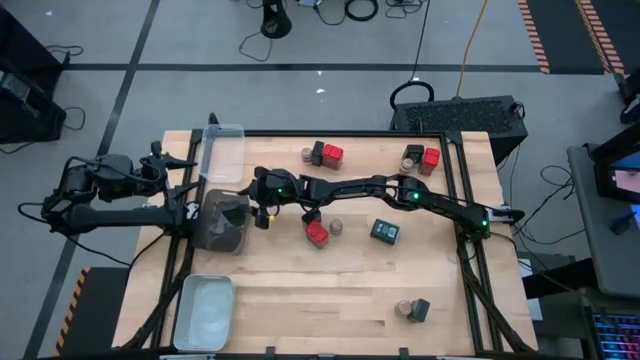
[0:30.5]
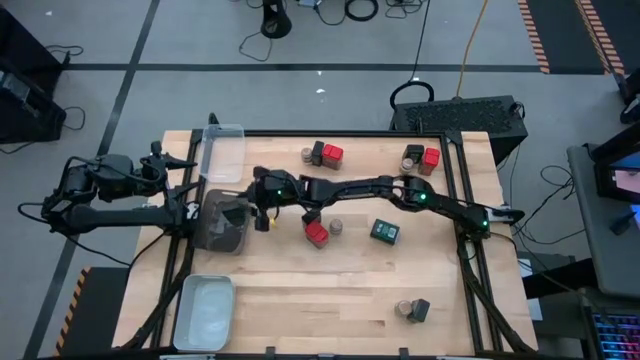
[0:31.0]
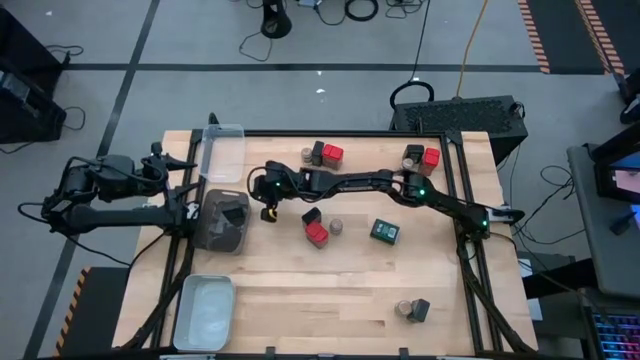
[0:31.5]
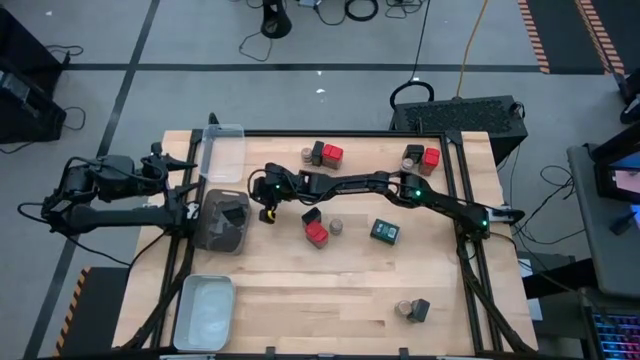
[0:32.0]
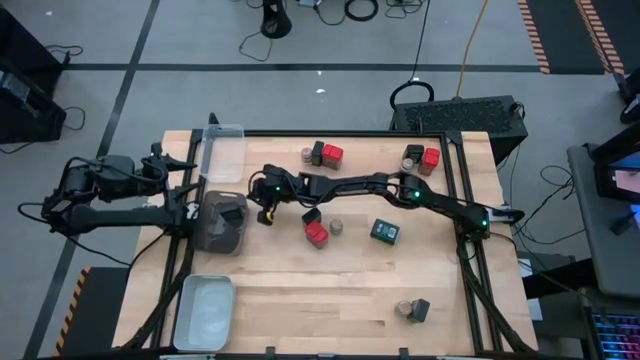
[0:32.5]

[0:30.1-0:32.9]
Task: Sort spices by type
Adjust the black bin

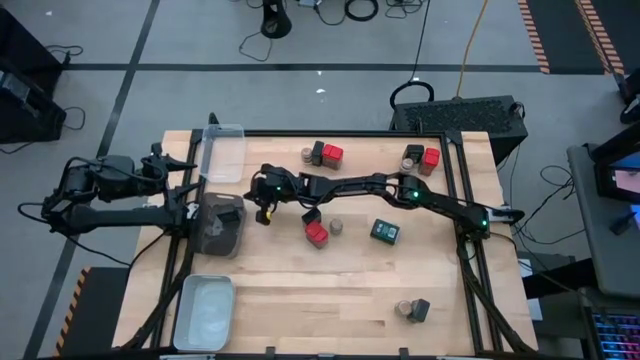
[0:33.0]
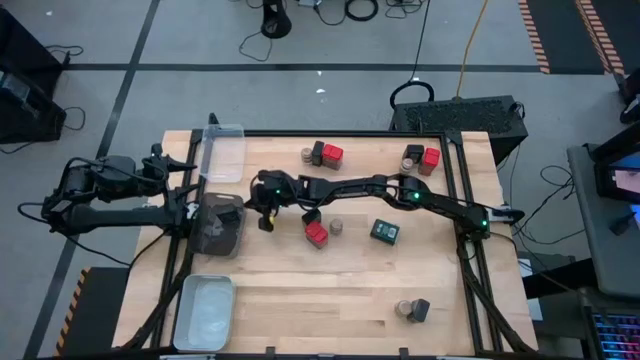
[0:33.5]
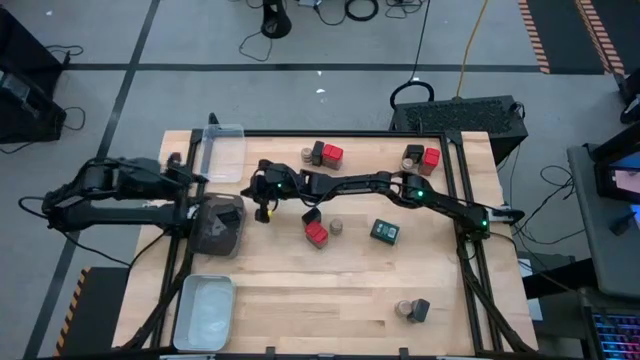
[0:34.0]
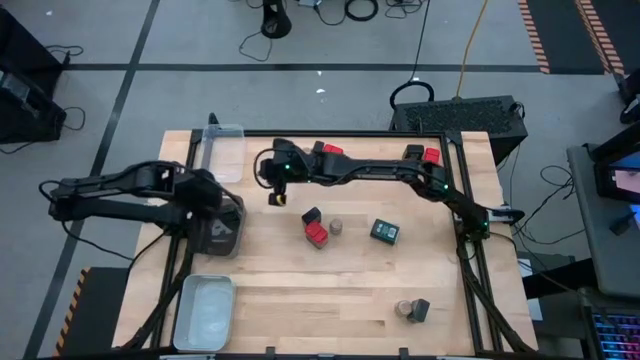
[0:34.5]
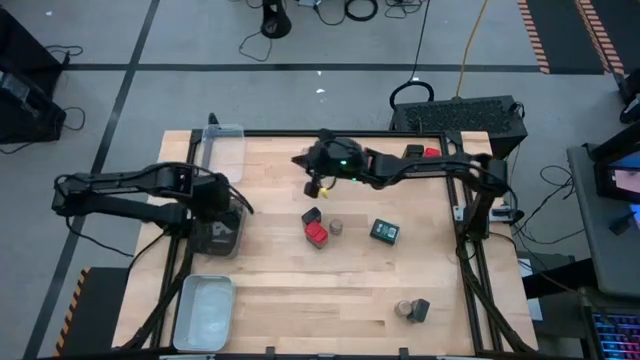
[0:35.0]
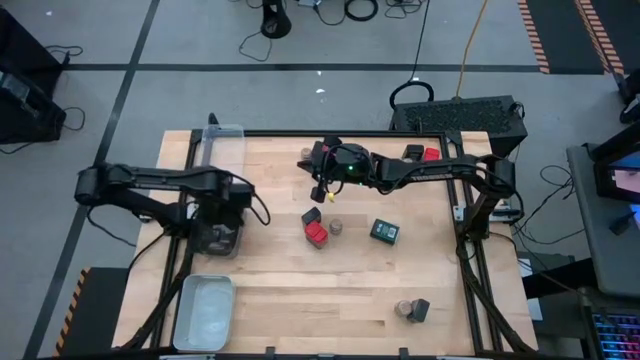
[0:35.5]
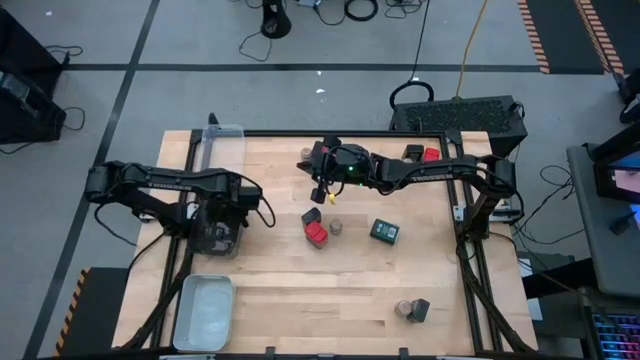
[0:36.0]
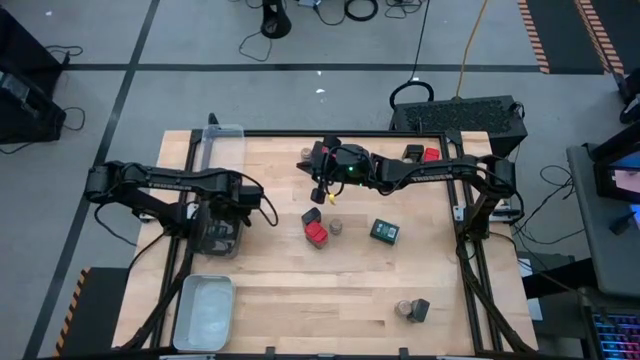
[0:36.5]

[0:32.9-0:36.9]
Adjust the black seasoning can in the black bin

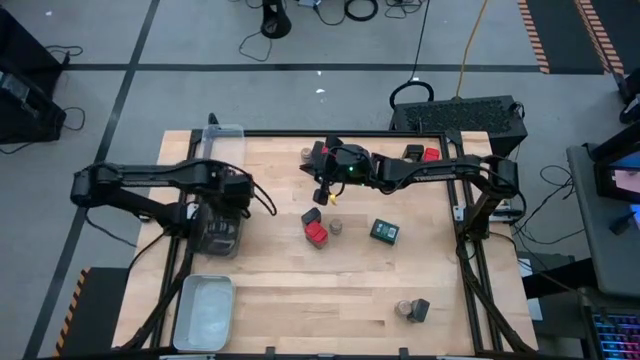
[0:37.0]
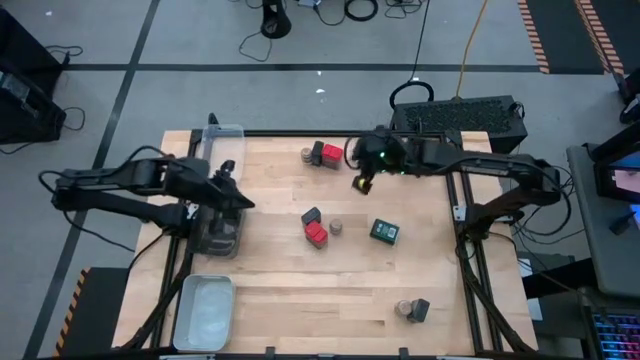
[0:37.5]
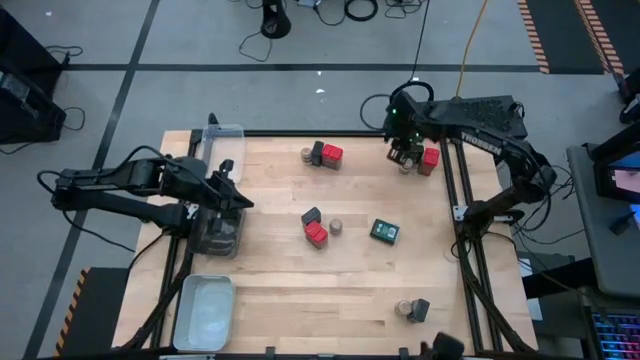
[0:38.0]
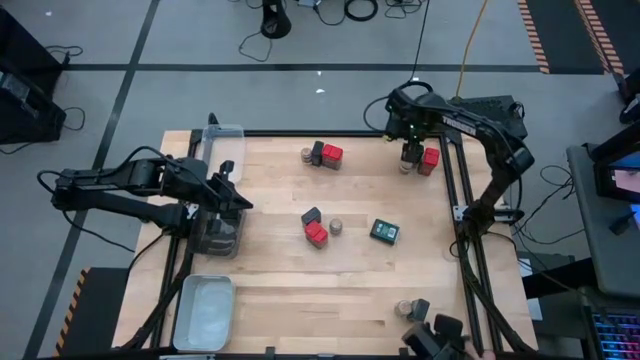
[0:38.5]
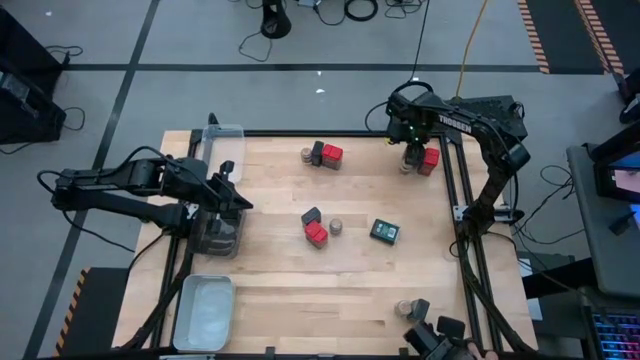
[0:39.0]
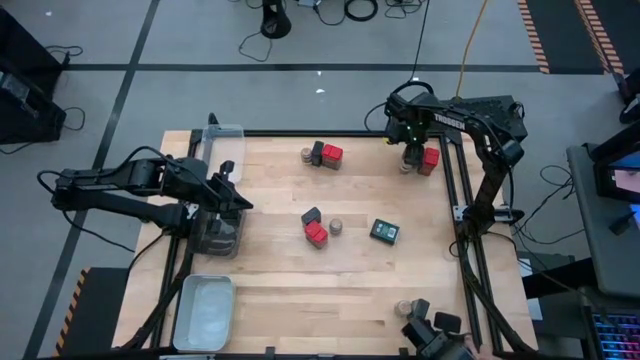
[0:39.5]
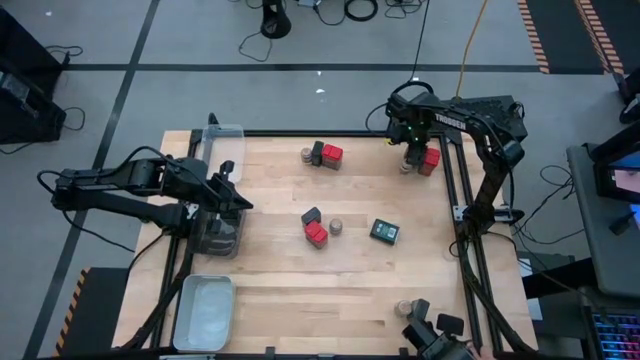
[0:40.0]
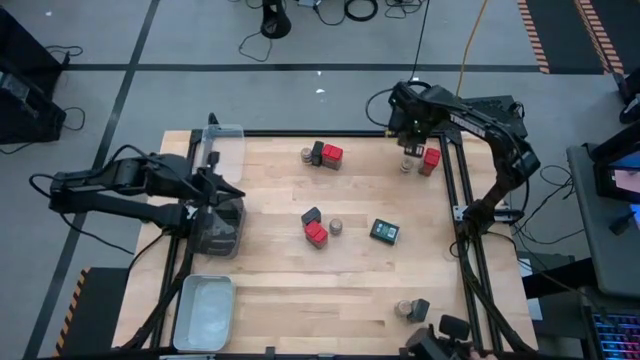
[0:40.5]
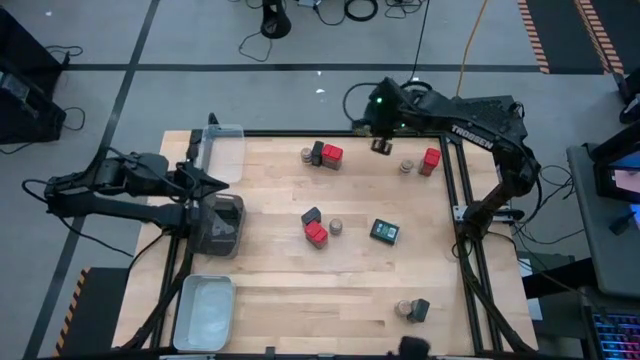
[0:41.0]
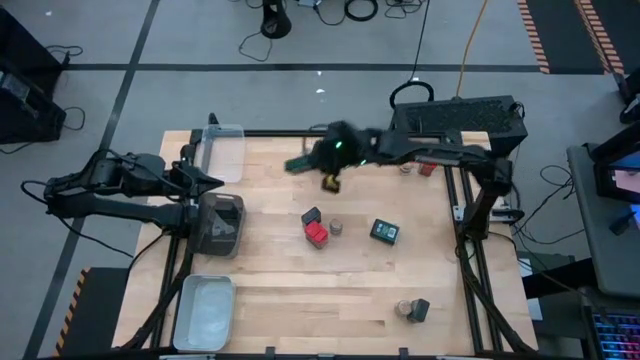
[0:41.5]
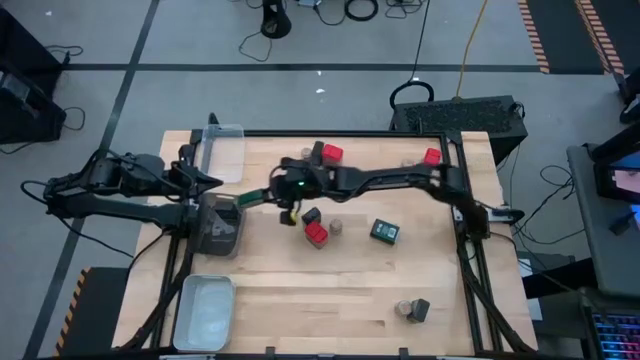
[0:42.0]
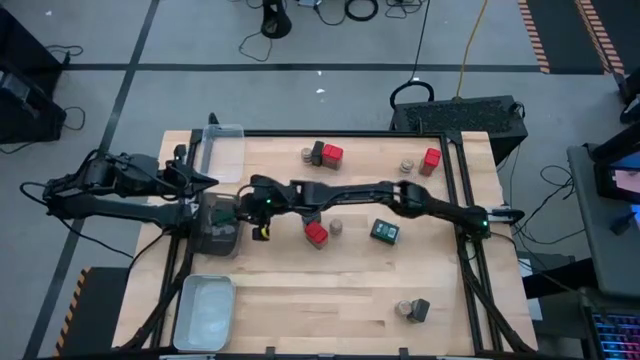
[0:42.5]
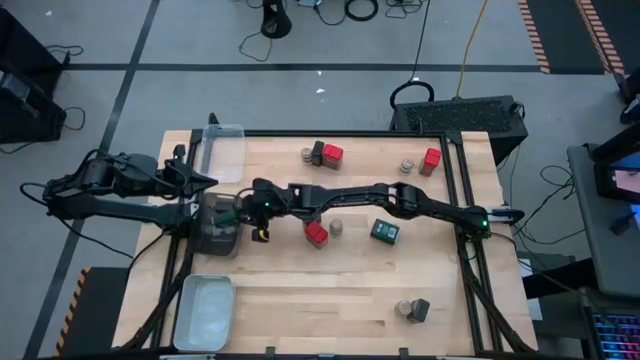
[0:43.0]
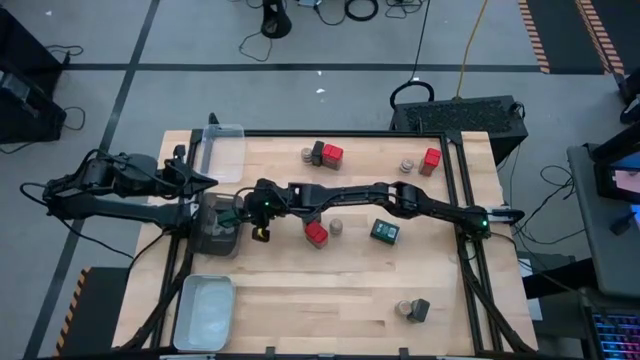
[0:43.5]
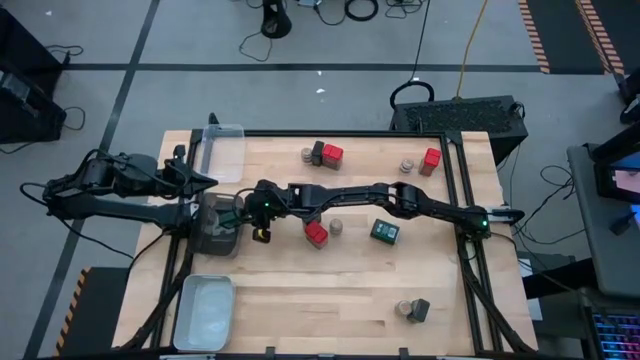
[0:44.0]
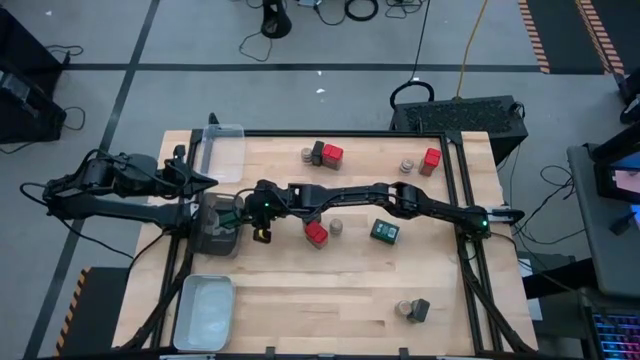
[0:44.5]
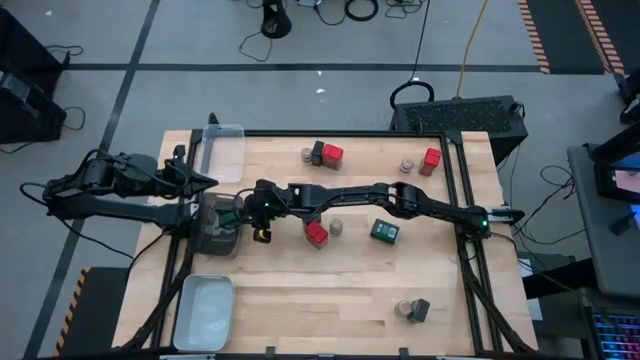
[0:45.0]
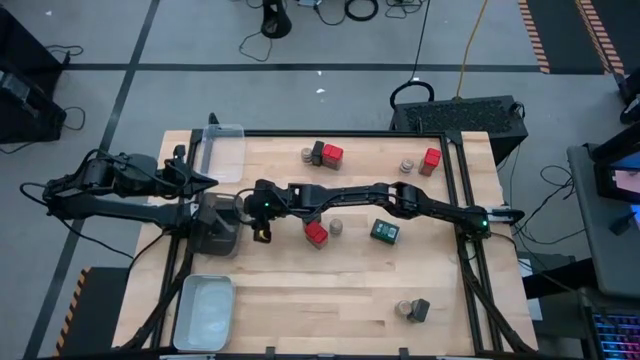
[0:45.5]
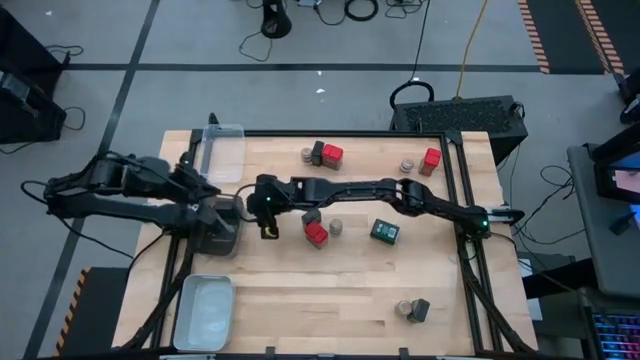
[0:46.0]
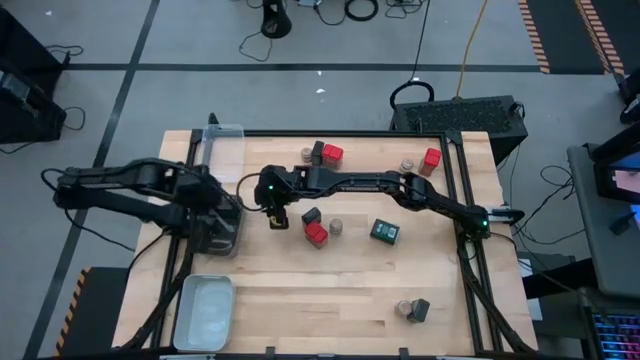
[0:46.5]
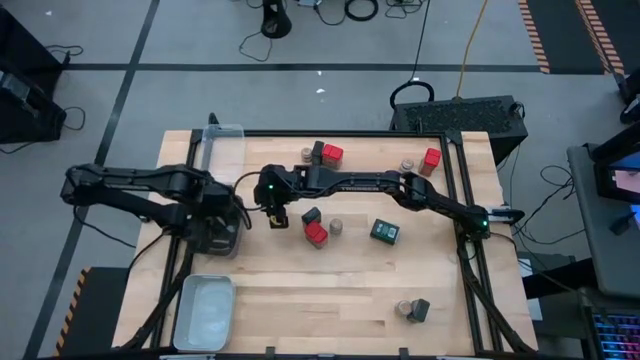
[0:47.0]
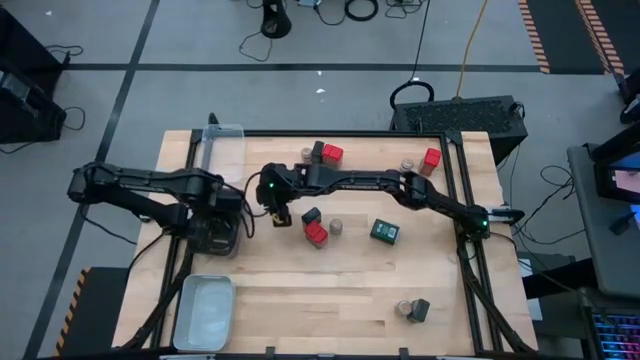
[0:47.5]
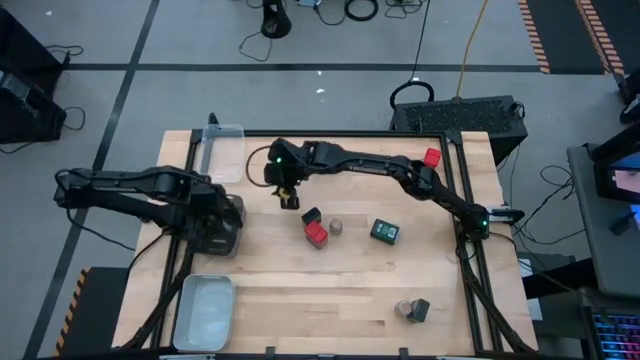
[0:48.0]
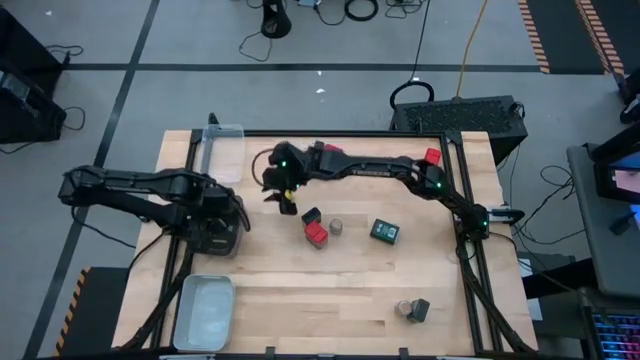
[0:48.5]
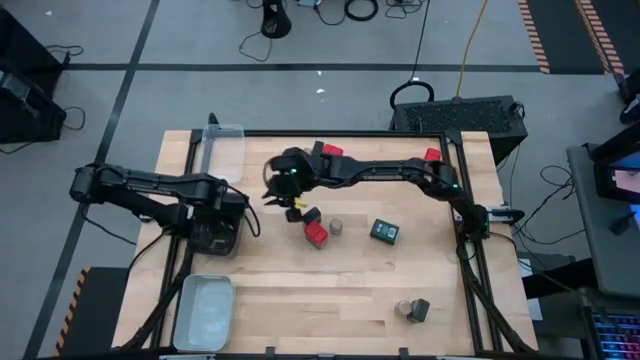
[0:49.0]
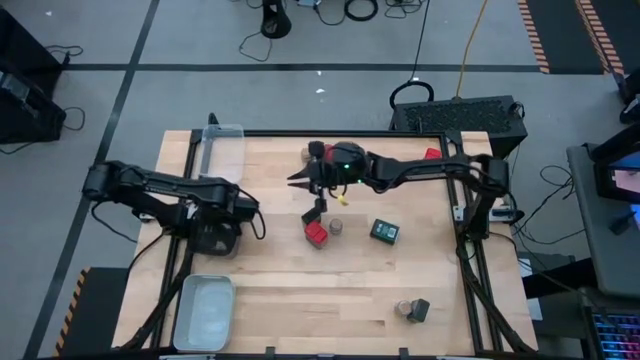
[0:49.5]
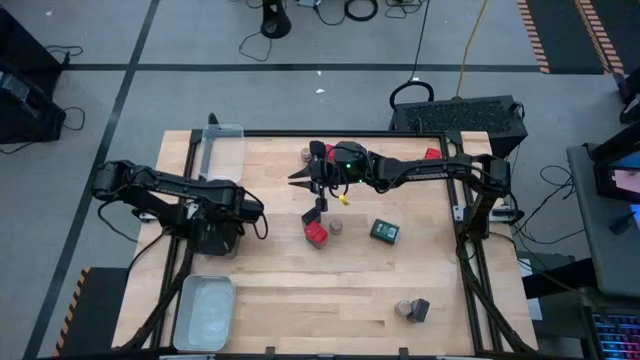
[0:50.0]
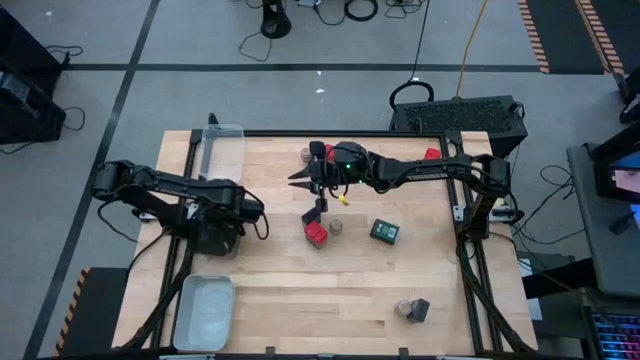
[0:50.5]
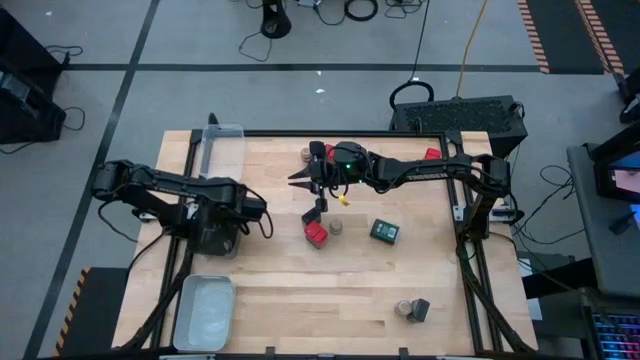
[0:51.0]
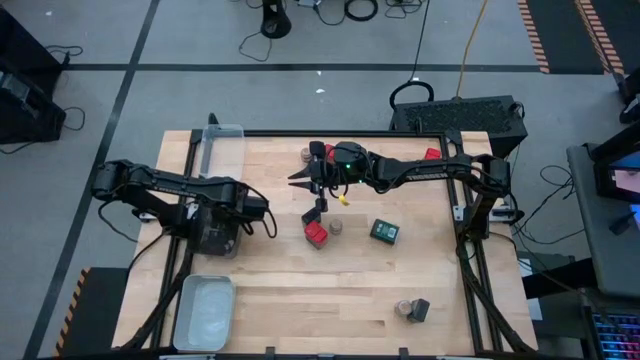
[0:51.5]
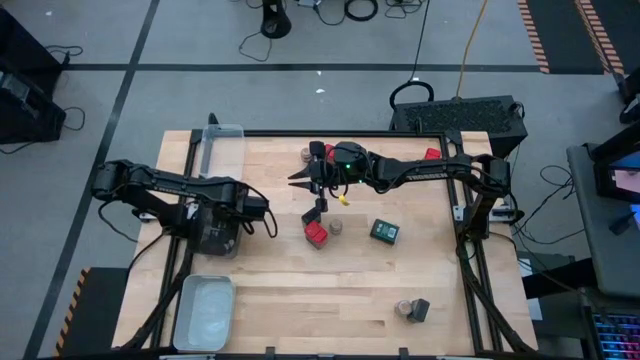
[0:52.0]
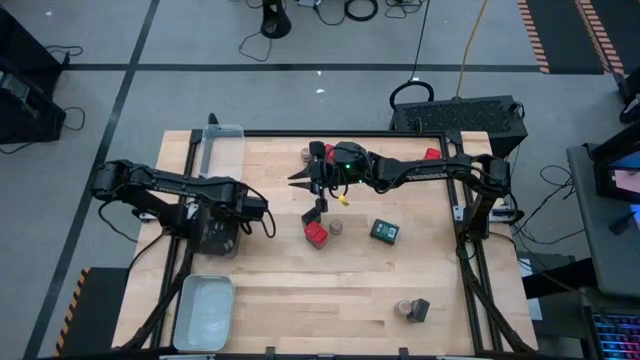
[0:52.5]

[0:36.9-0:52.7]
Put the black seasoning can into the black bin
